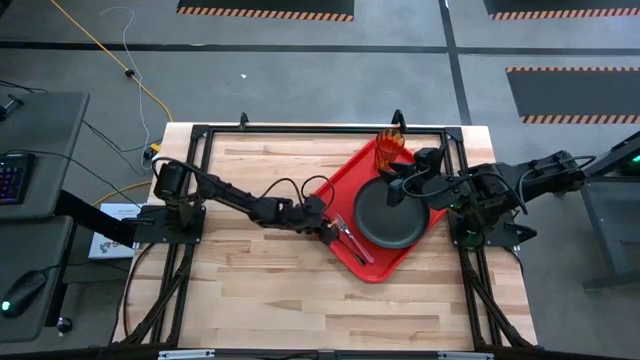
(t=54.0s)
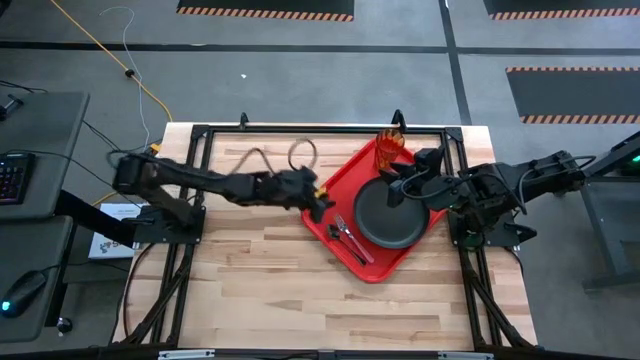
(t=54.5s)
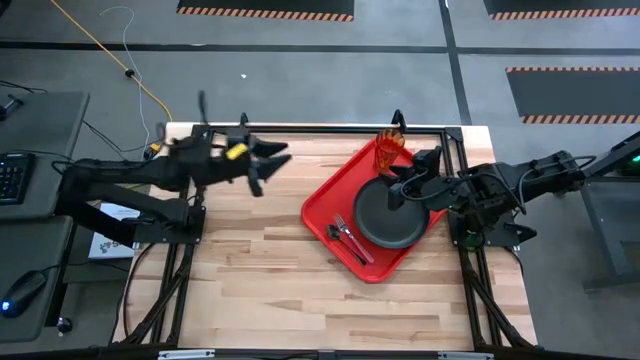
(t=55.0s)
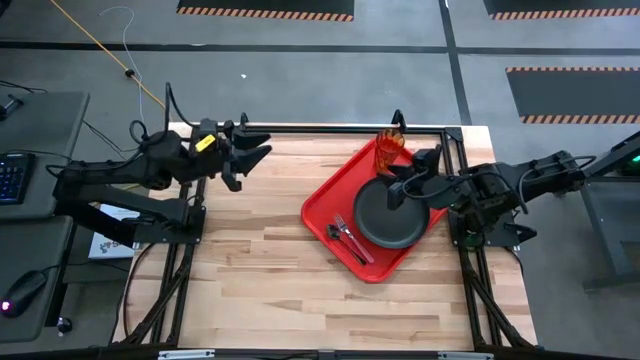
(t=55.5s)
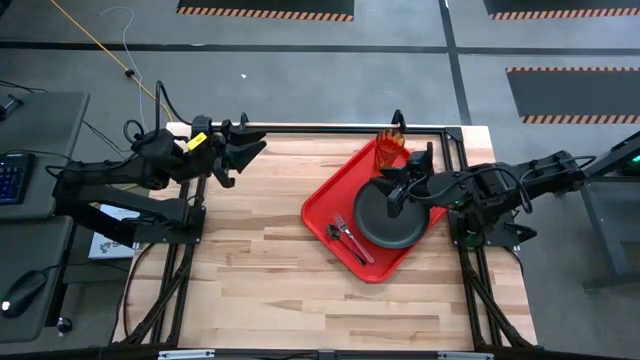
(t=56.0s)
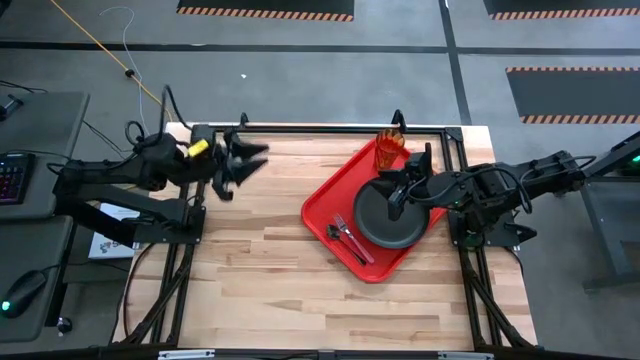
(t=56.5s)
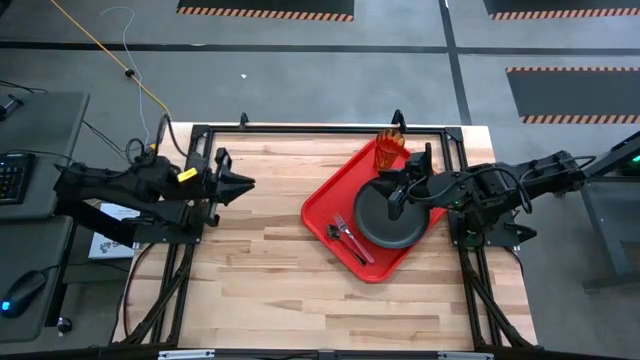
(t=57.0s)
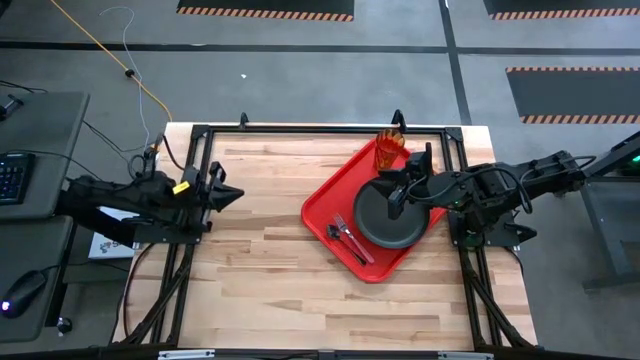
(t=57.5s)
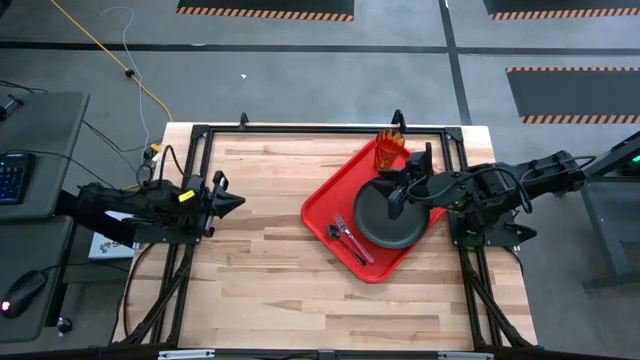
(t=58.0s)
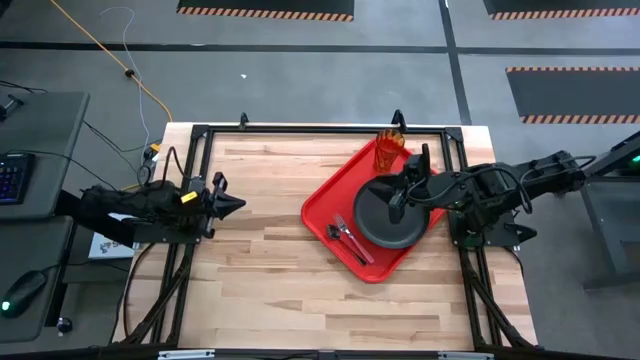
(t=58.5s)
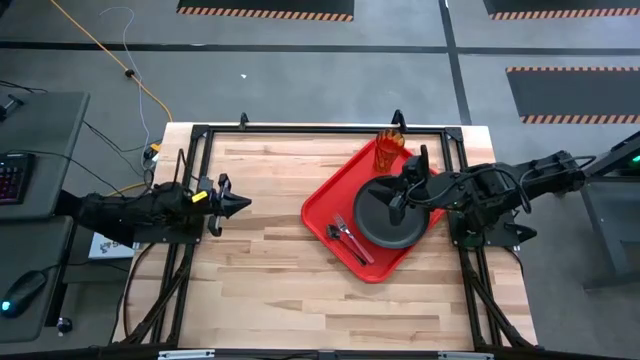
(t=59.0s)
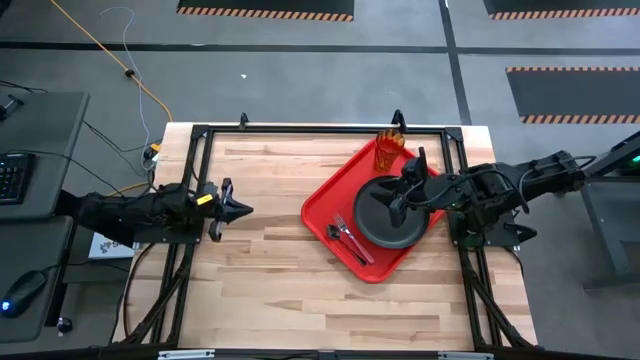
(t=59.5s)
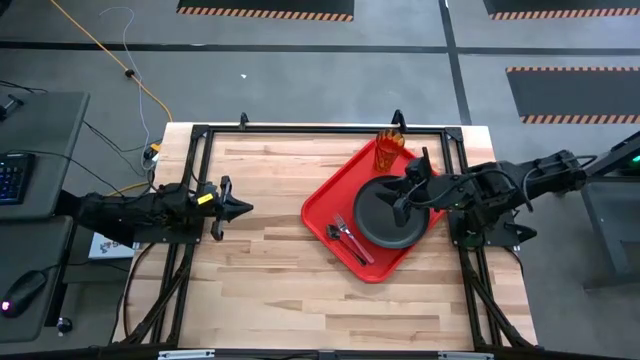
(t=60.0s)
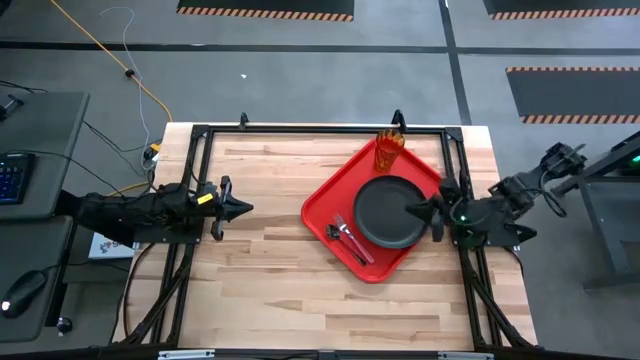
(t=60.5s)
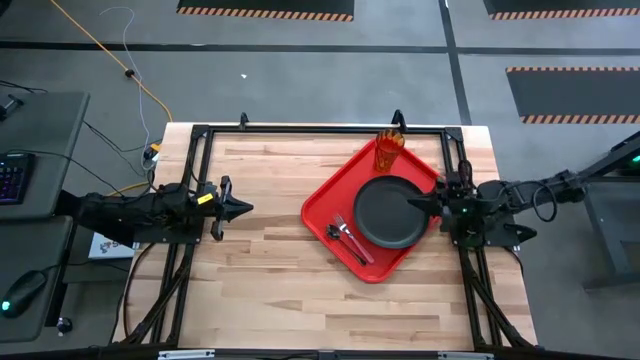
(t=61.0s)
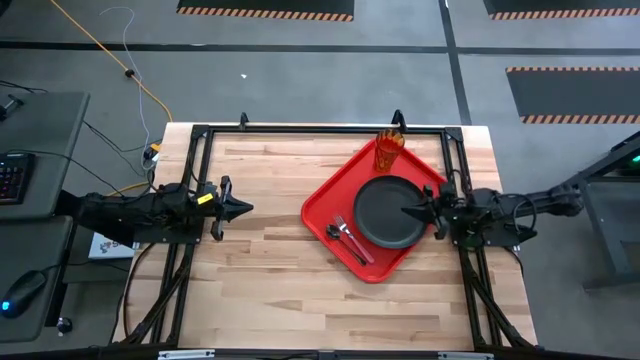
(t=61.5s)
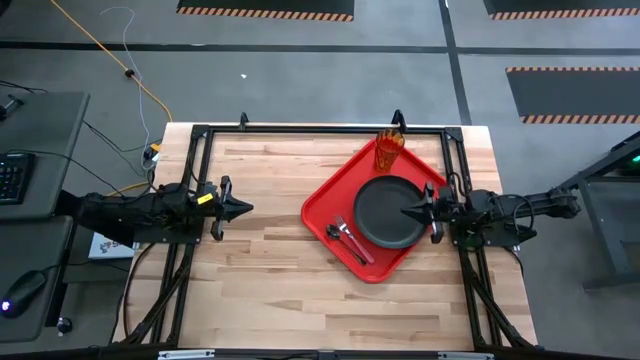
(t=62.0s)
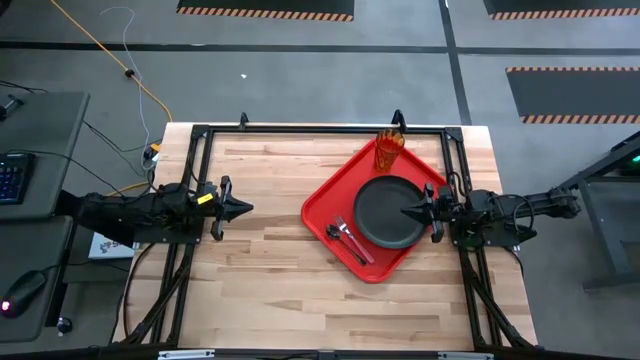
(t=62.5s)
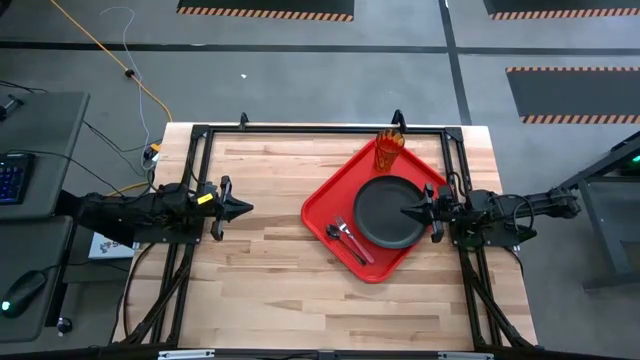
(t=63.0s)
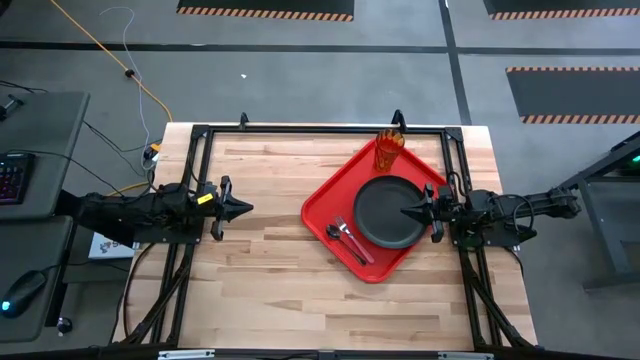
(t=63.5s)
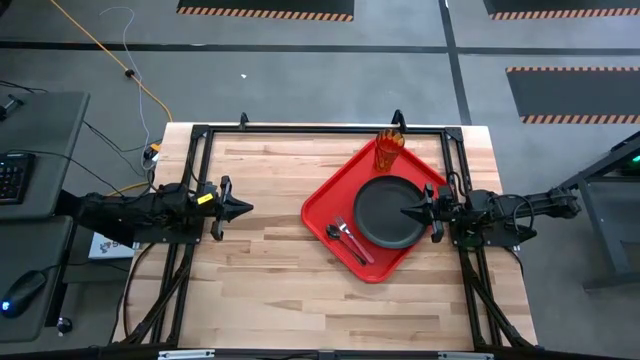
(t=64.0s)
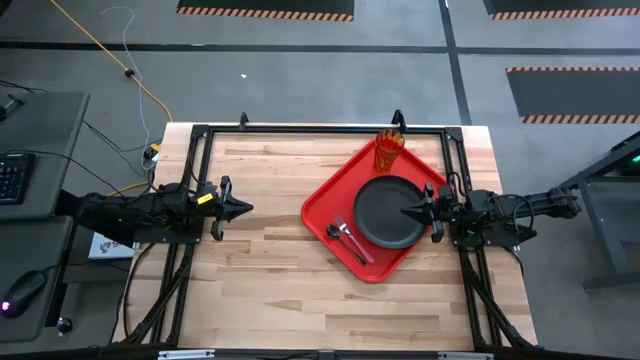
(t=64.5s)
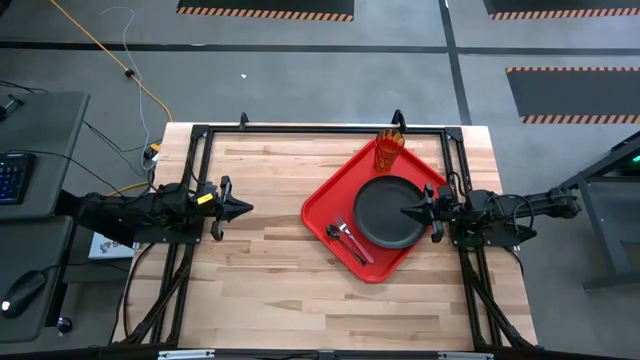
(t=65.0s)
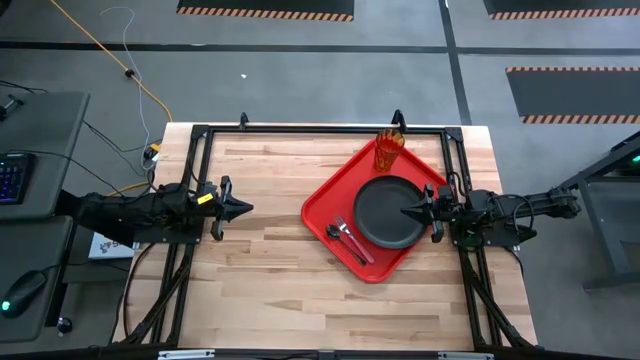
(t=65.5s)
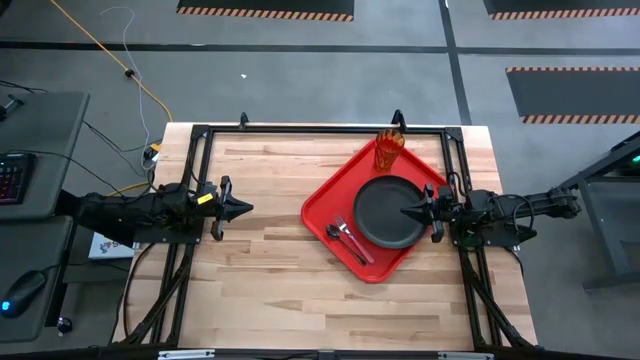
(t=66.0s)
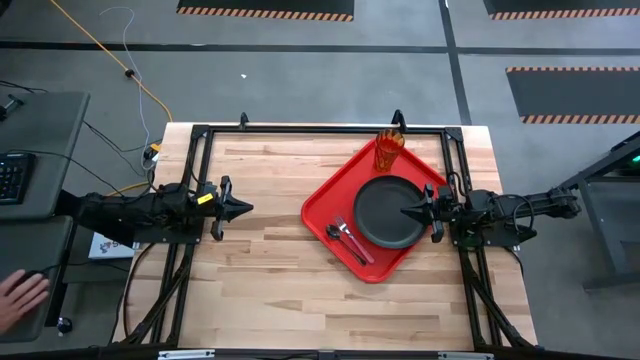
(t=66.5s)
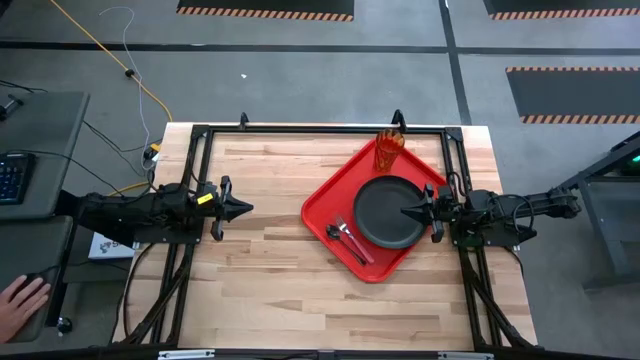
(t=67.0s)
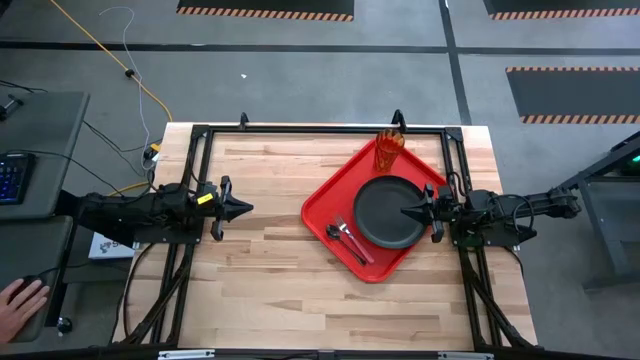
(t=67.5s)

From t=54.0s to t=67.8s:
Task: Pick and place plate/cup/fork/spoon on tray
Return to Home Position

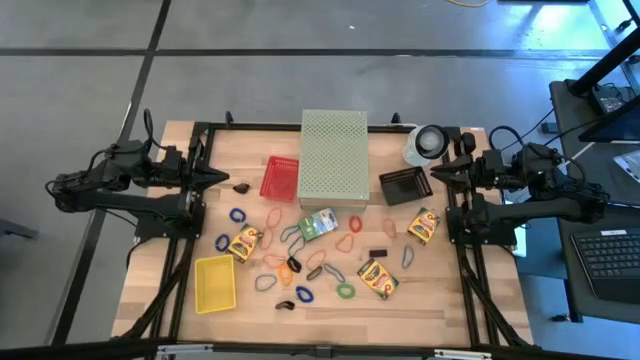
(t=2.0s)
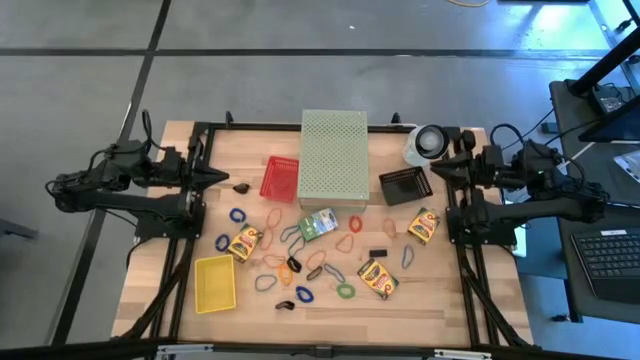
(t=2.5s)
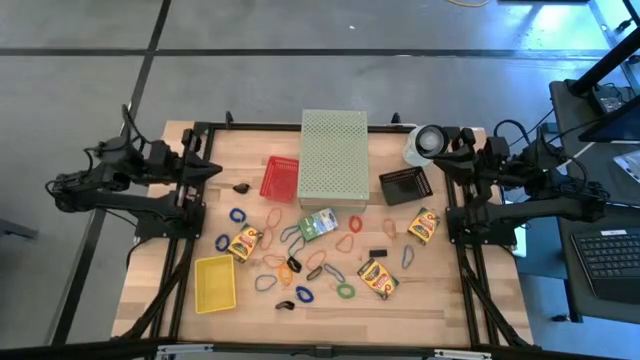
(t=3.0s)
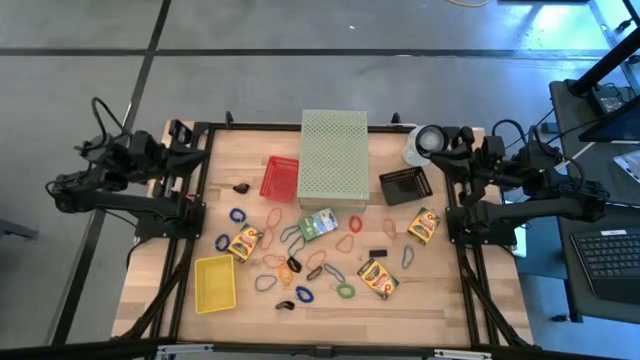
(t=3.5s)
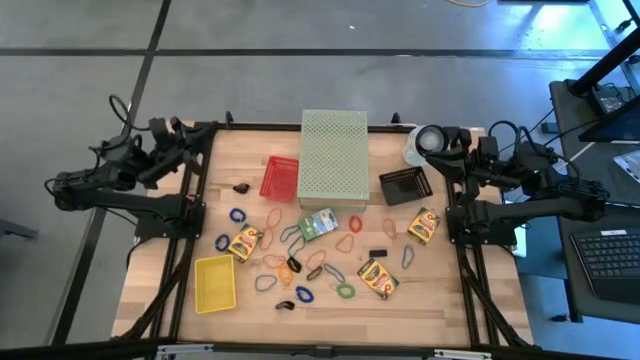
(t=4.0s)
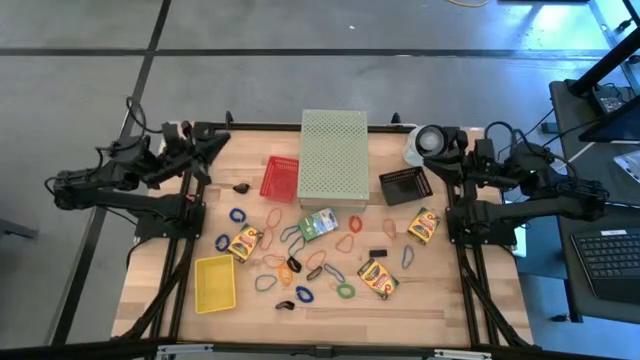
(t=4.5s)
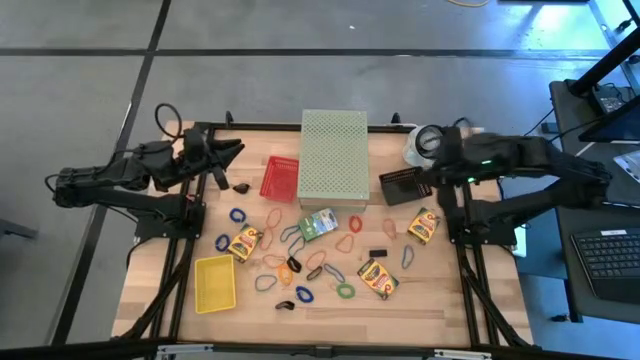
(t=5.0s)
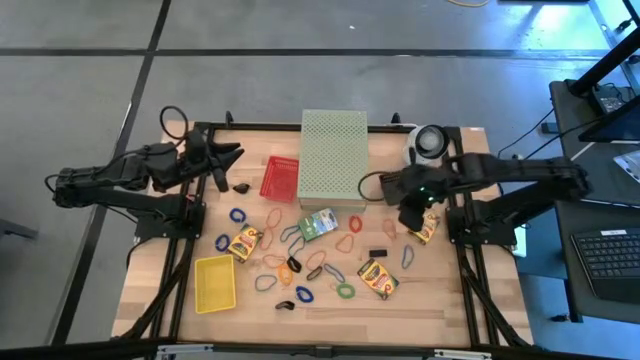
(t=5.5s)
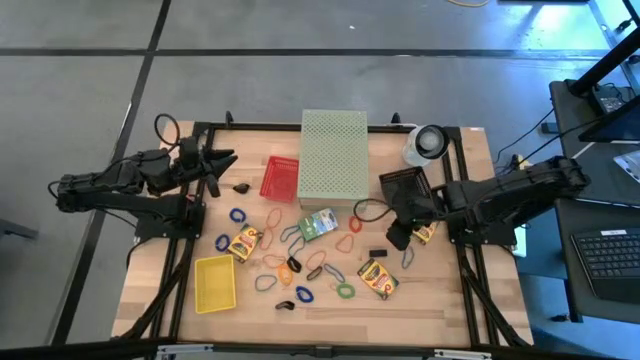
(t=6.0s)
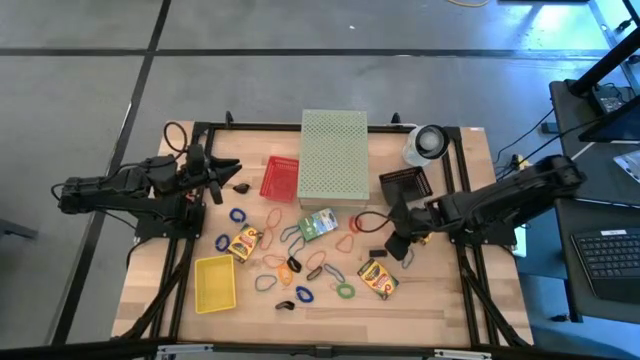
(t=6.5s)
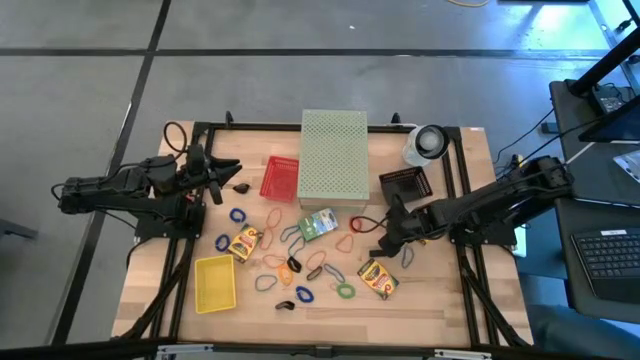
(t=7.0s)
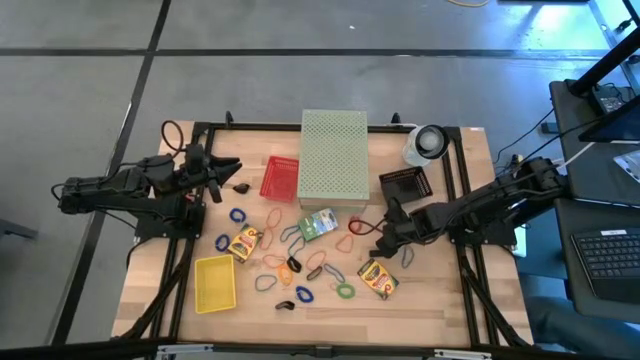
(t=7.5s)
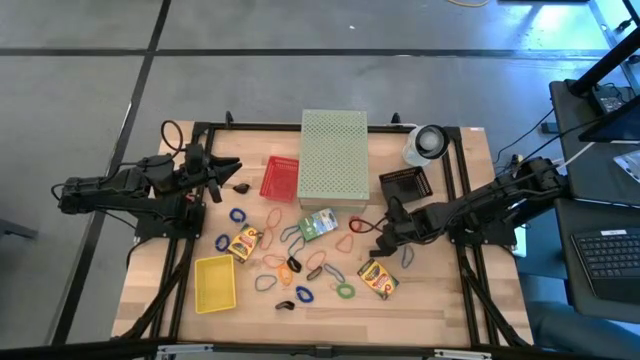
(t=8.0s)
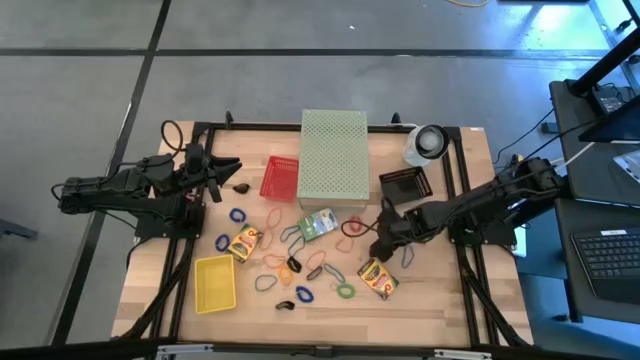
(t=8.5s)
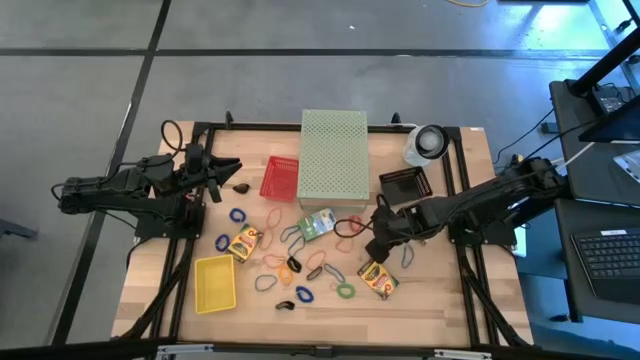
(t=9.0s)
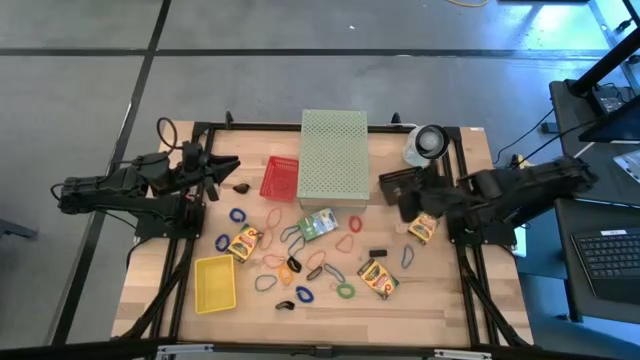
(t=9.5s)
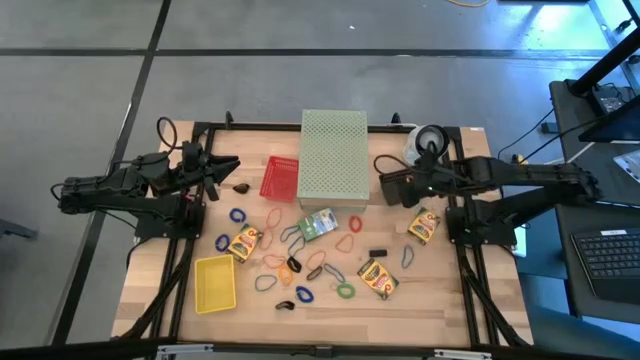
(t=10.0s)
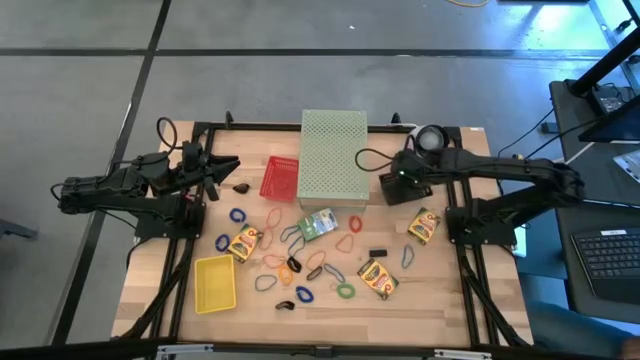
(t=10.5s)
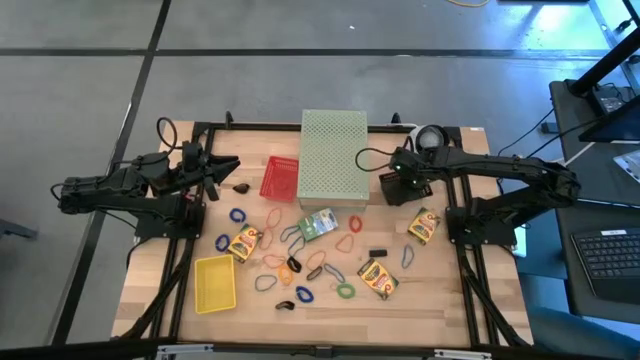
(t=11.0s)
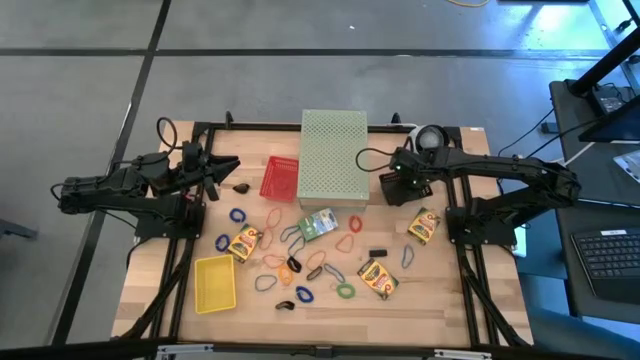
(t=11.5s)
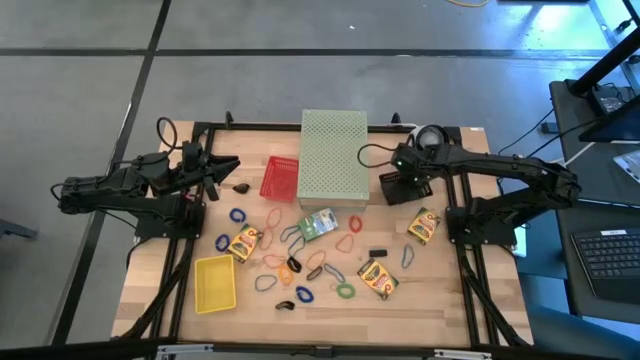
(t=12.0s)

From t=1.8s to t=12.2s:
Task: Pick & Place Office Desk Supplies
Put the orange rubber band into the black bin
